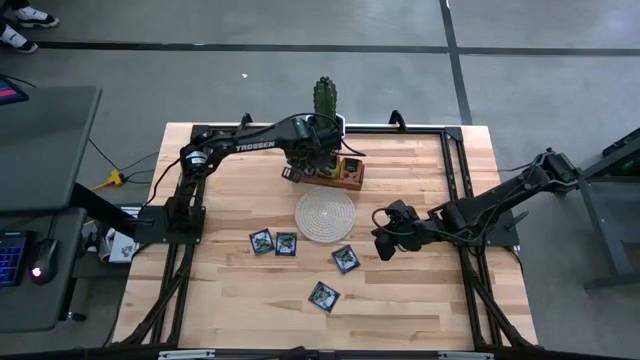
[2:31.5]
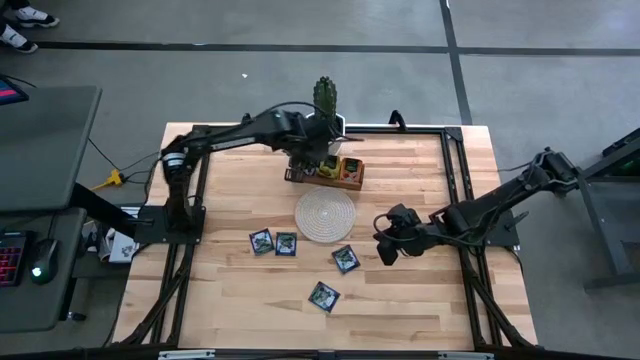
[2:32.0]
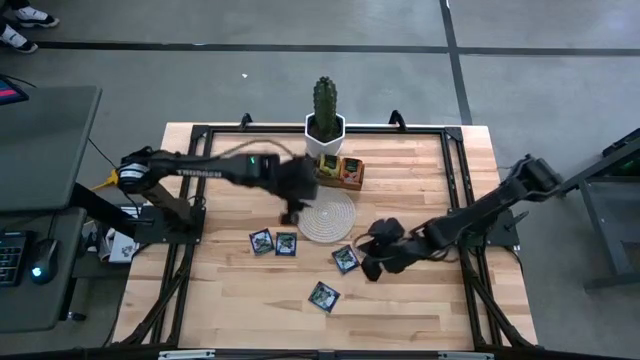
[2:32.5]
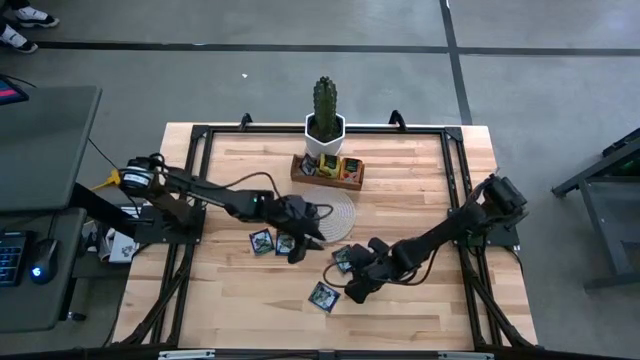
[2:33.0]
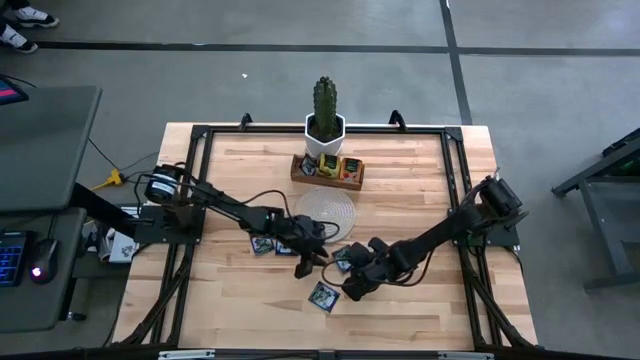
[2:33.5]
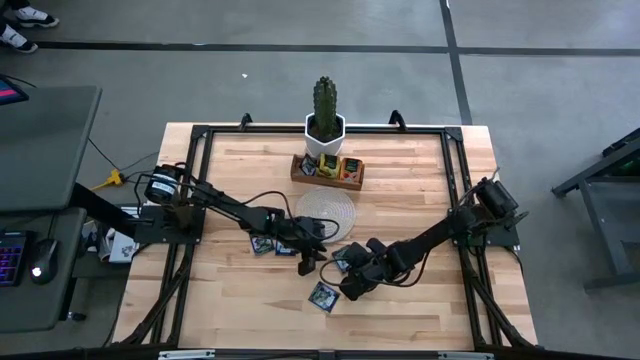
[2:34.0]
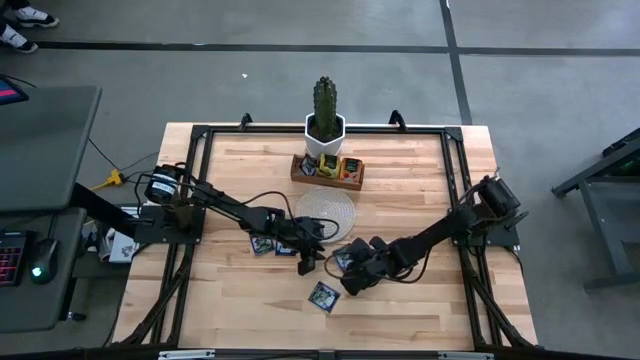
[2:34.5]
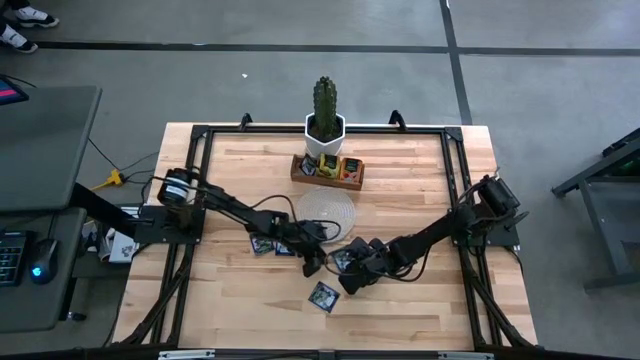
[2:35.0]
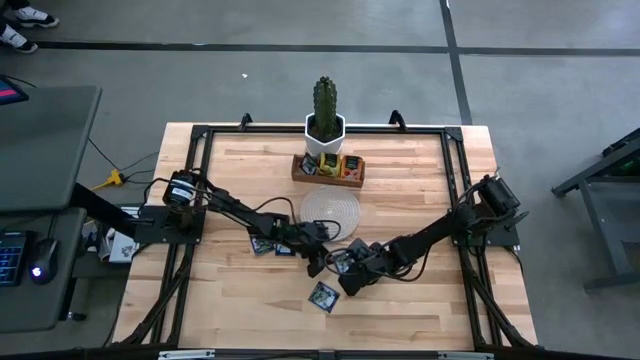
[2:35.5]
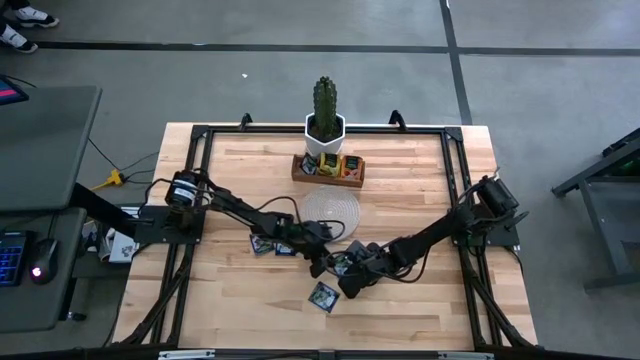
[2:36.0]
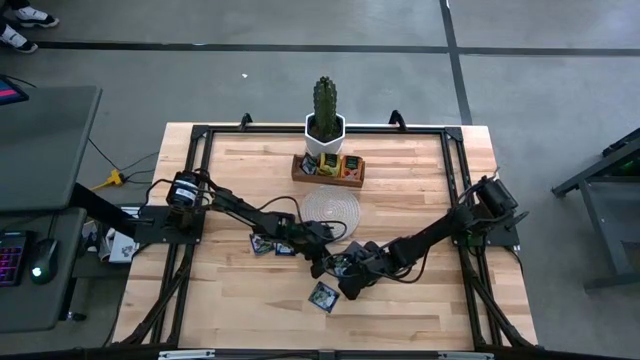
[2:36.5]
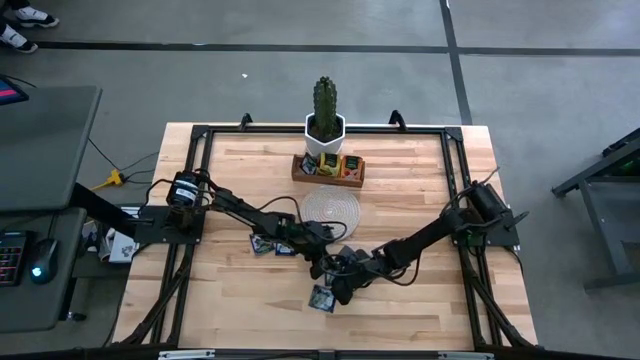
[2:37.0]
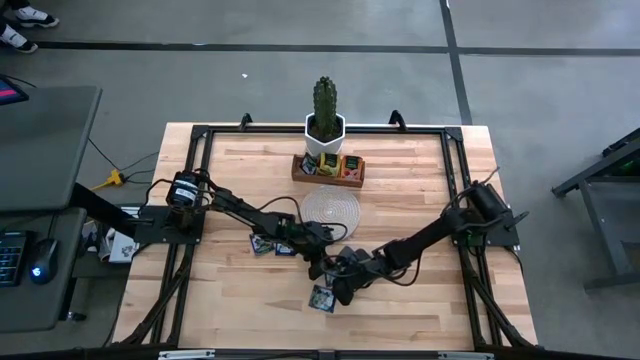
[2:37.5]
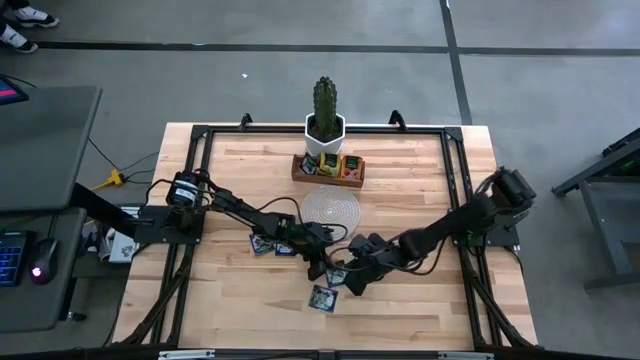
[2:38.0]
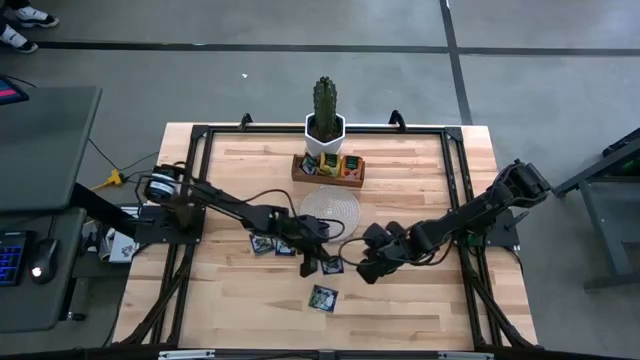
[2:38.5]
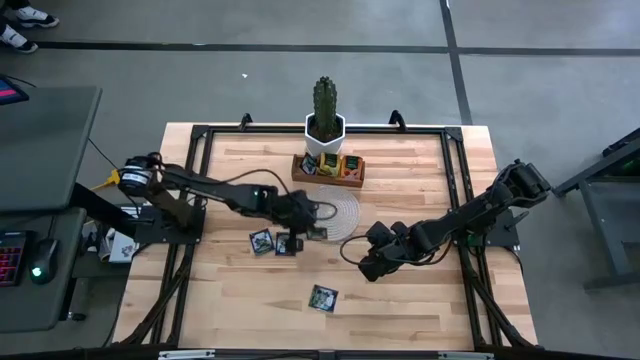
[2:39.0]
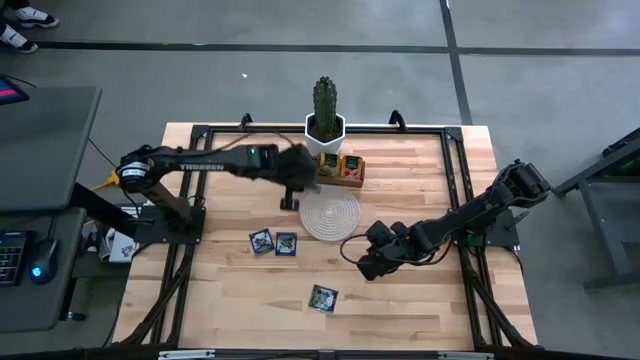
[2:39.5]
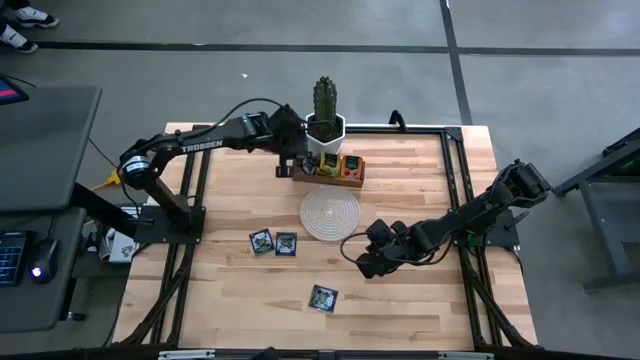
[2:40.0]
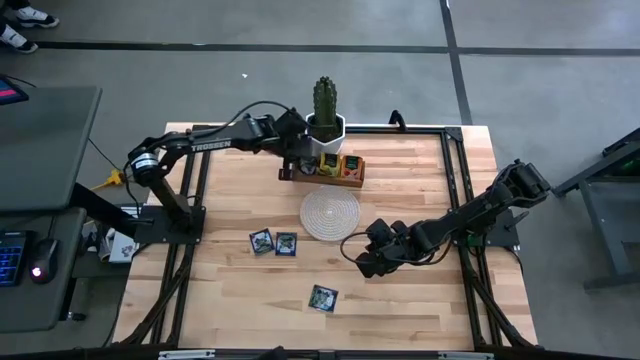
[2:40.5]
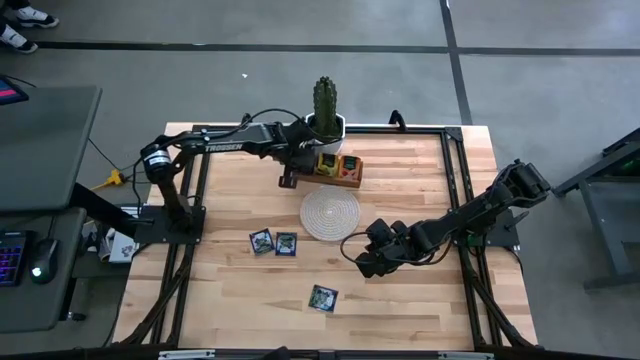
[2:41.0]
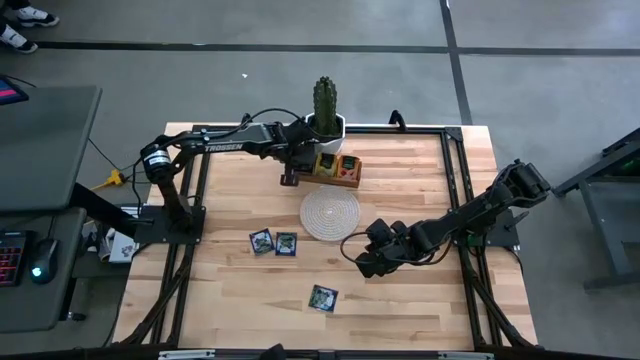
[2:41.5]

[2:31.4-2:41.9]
Task: Pick & Place Tea
Put the purple tea bag into the left section of the wooden organizer

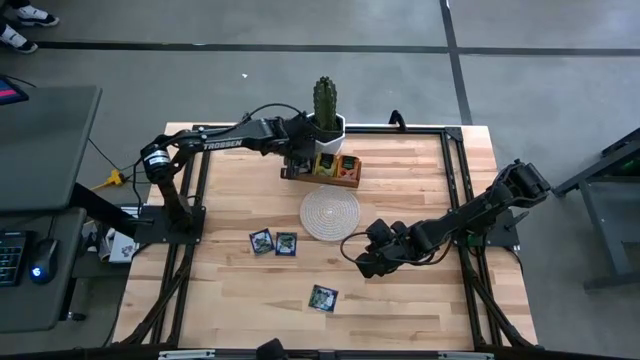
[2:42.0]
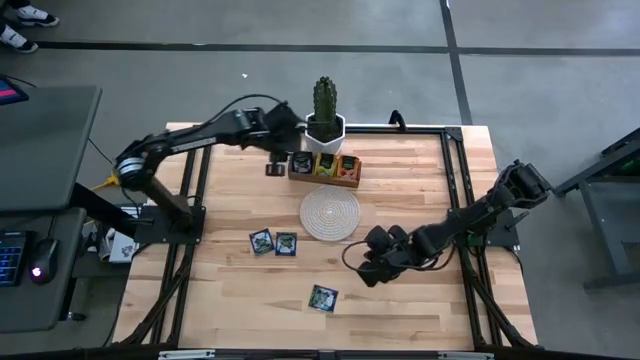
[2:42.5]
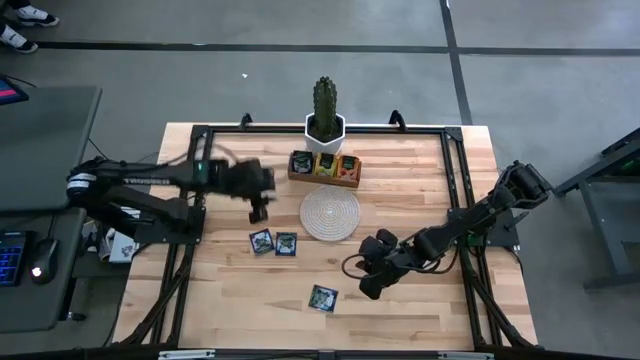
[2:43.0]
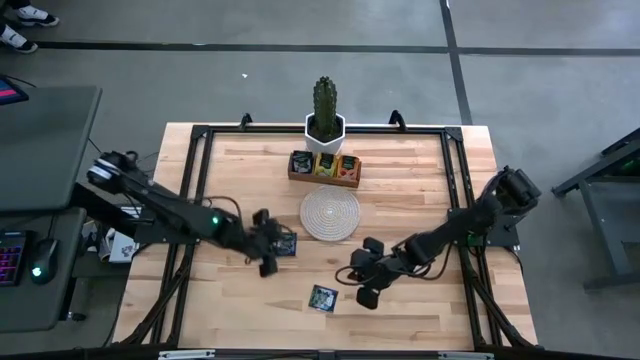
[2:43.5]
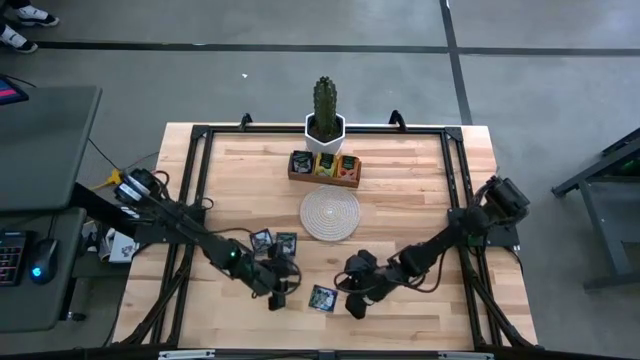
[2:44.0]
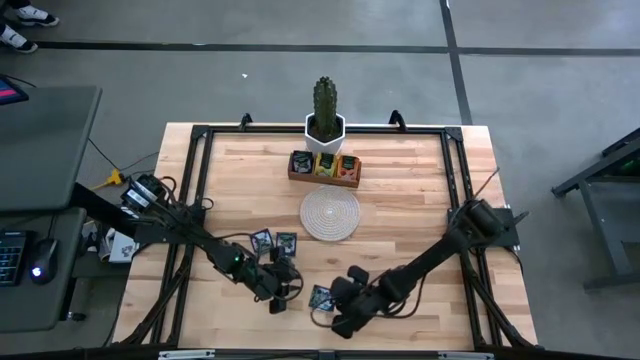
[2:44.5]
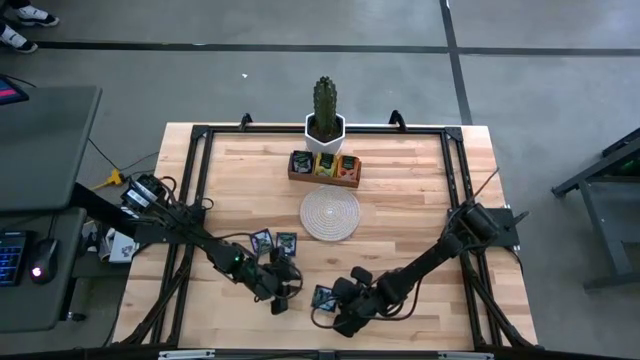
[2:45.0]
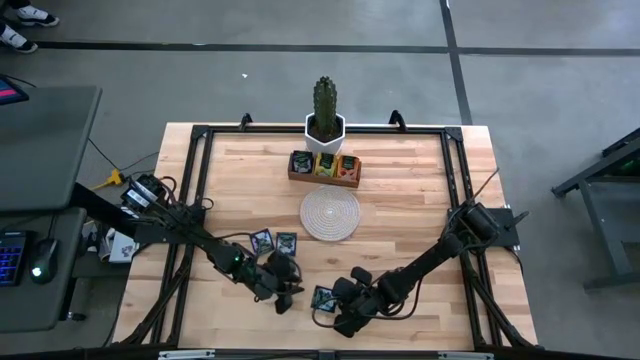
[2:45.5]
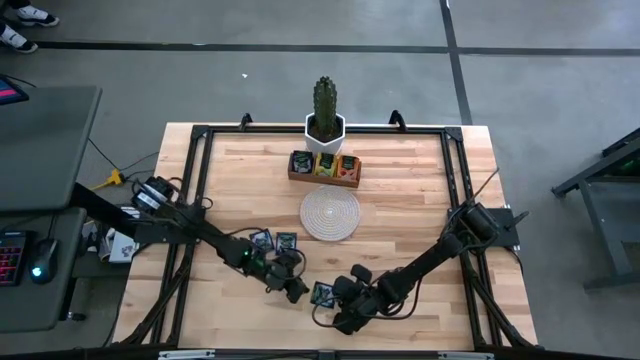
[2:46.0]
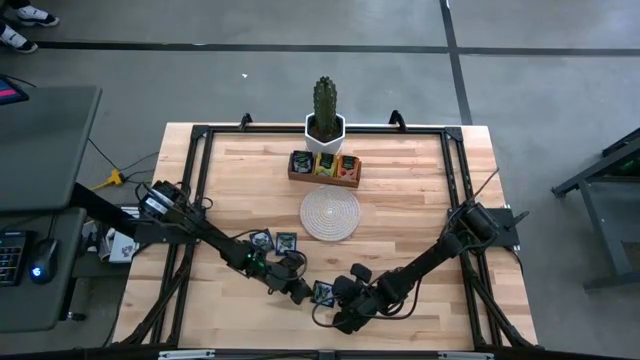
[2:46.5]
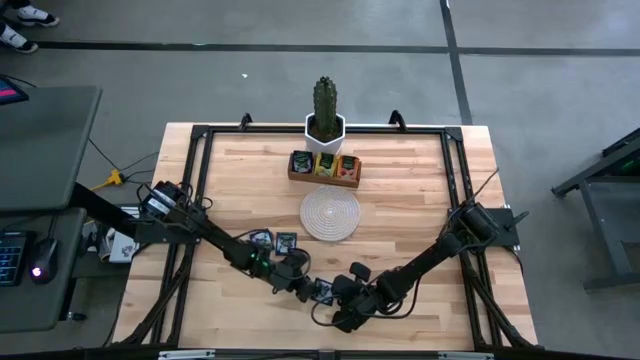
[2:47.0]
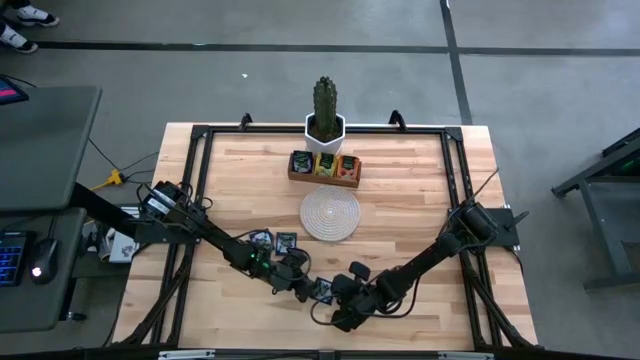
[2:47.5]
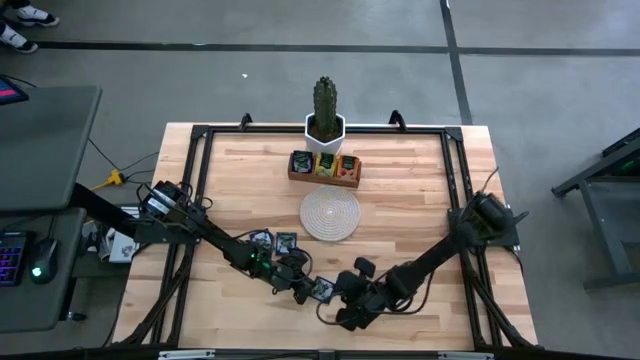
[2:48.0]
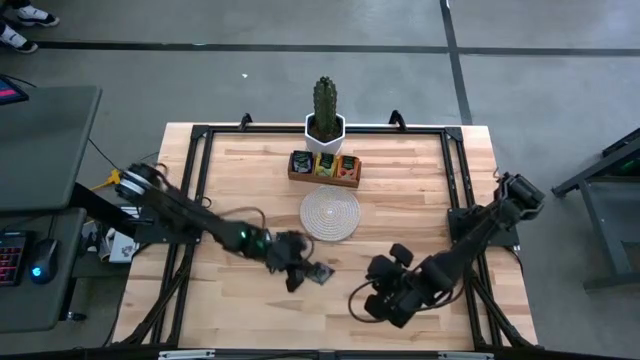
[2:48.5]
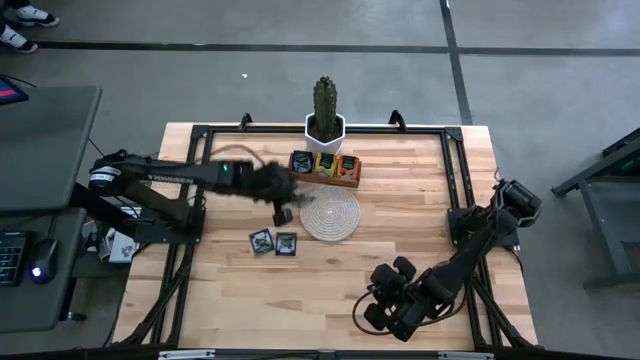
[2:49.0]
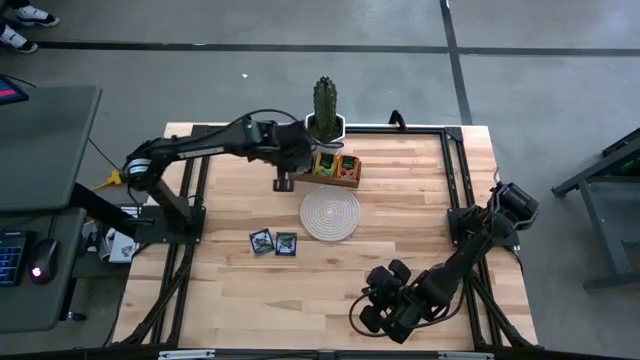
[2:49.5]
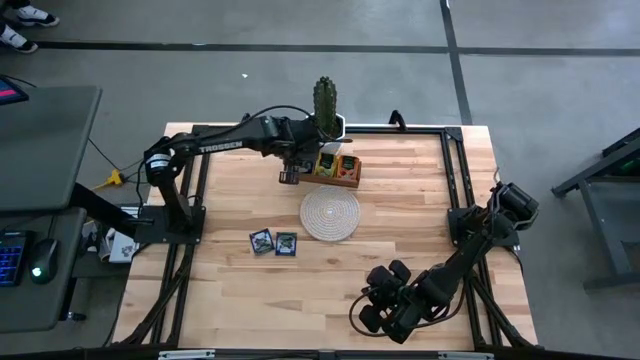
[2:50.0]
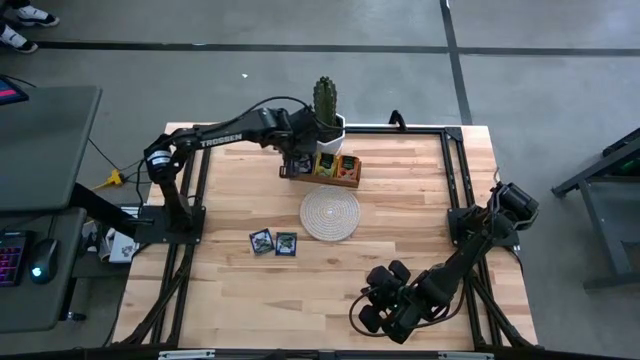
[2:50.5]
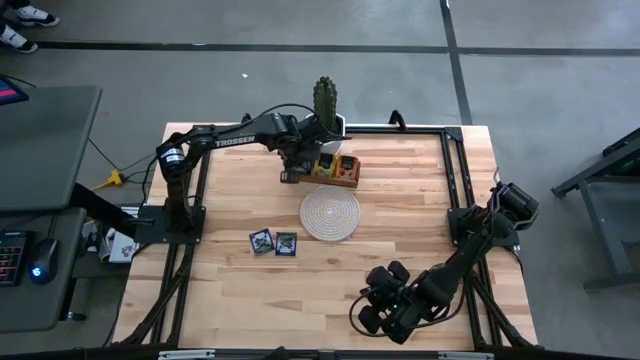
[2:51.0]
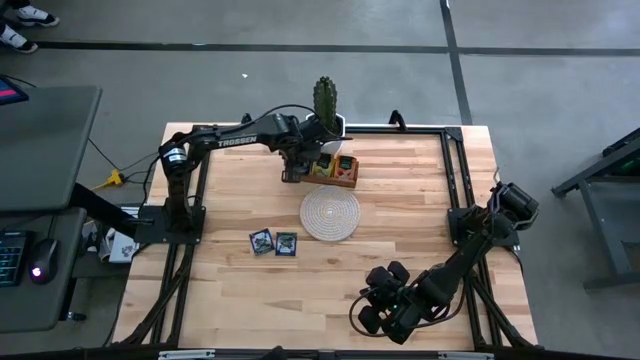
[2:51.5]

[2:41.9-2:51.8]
Put the purple tea bag into the left section of the wooden organizer

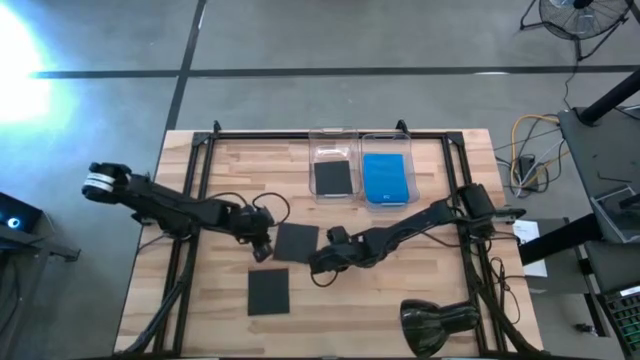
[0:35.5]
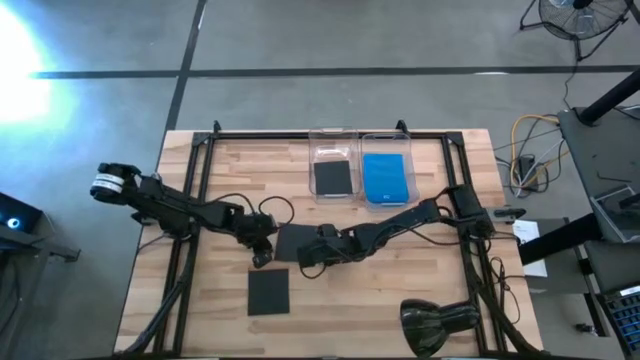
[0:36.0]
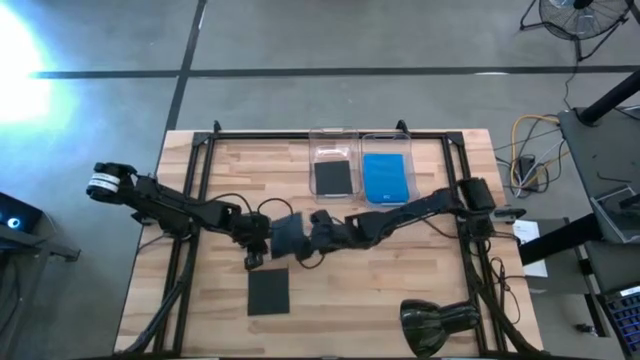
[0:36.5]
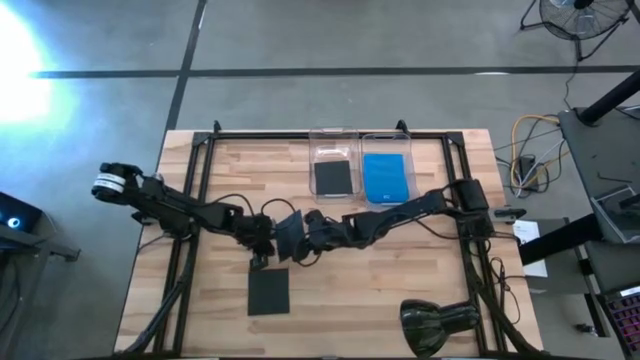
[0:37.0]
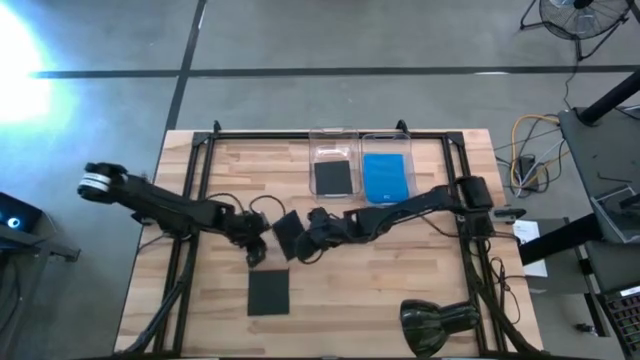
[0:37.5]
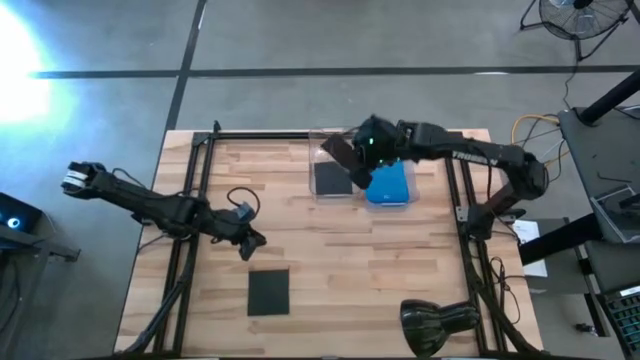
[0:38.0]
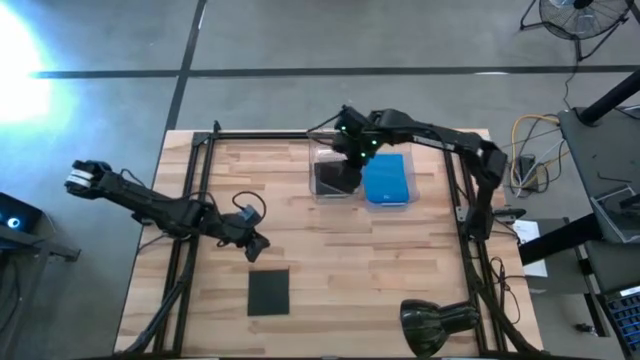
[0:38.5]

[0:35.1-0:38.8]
Task: Pick & place jewel cases by type
Put the top black CD case into the left transparent bin
